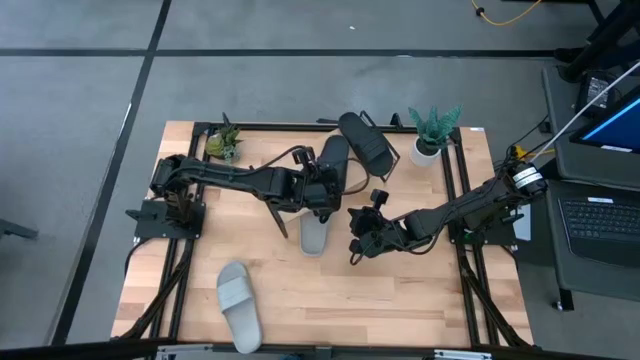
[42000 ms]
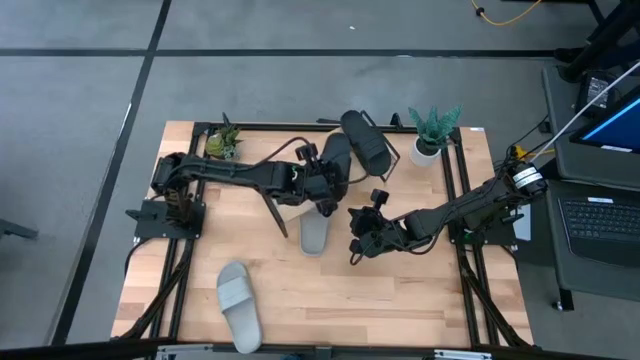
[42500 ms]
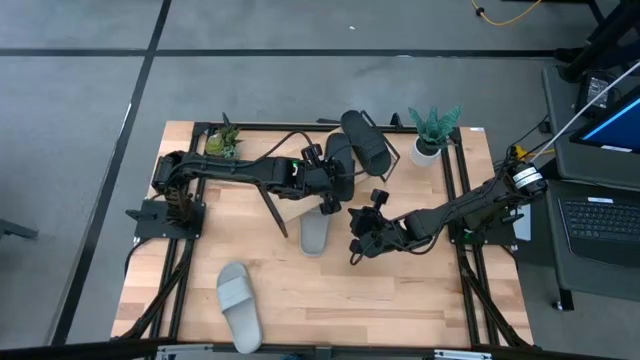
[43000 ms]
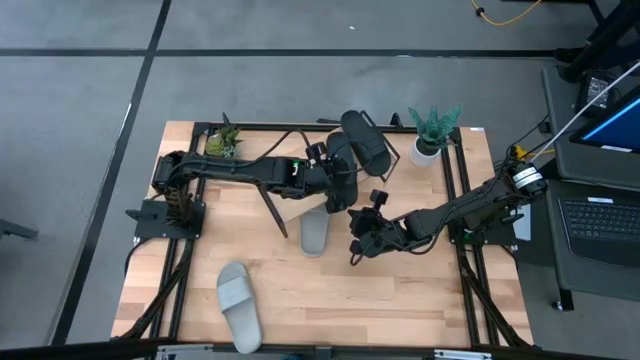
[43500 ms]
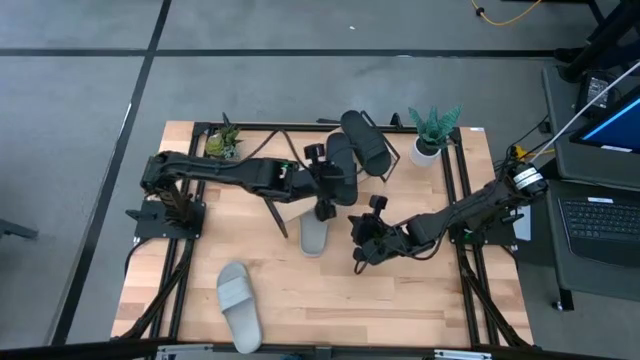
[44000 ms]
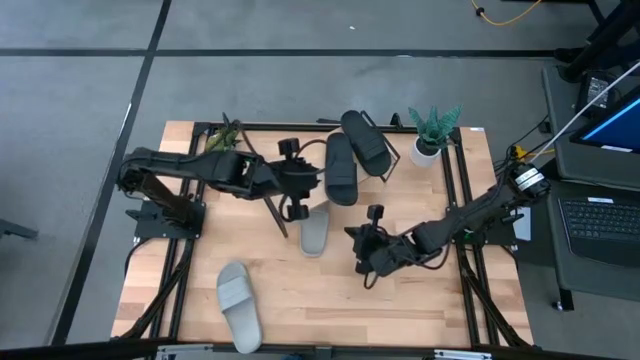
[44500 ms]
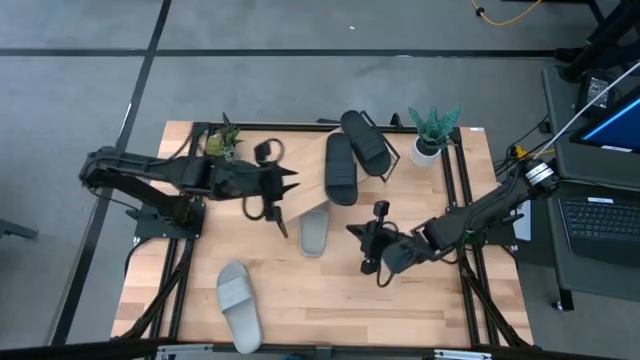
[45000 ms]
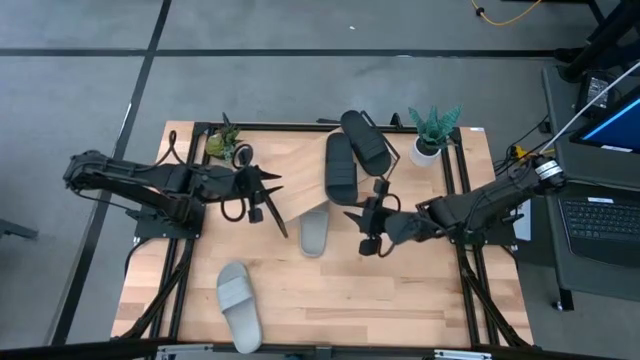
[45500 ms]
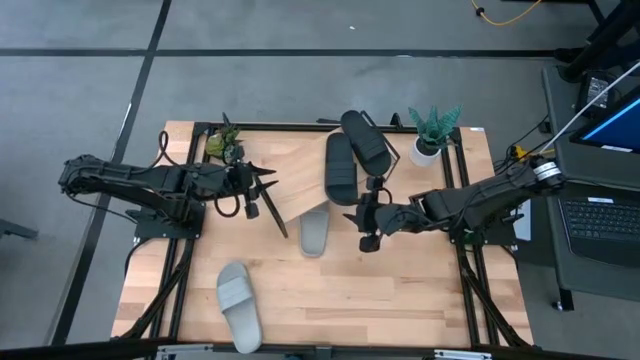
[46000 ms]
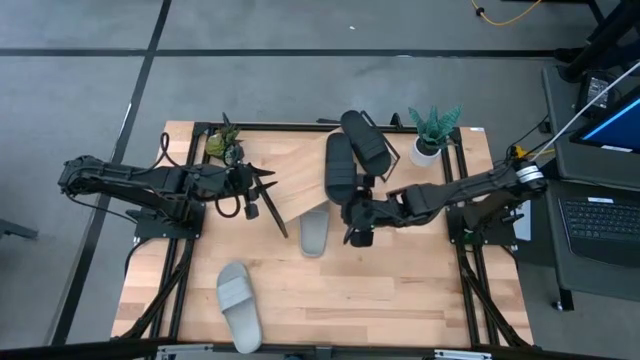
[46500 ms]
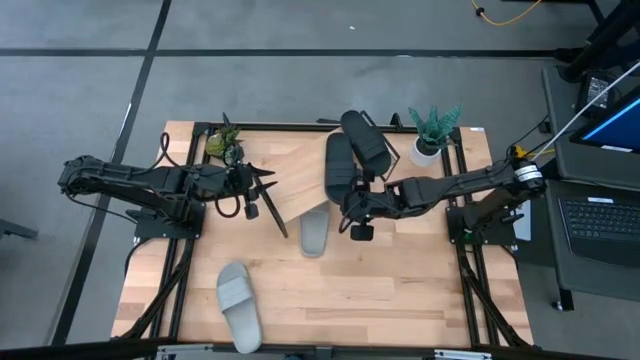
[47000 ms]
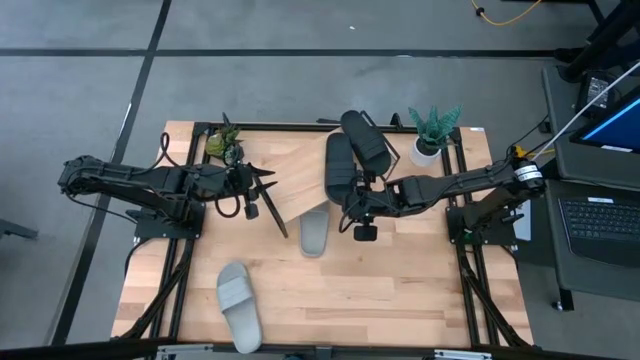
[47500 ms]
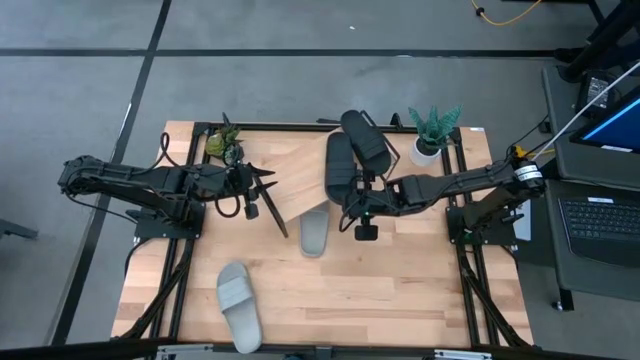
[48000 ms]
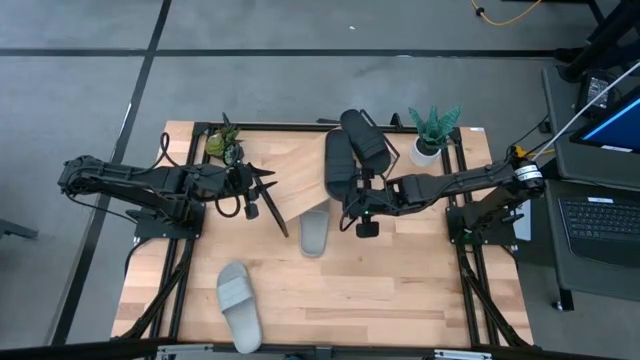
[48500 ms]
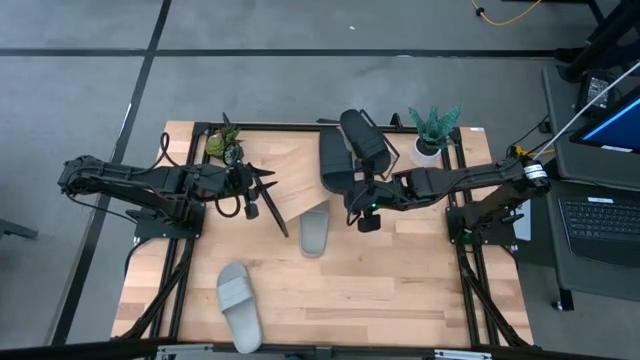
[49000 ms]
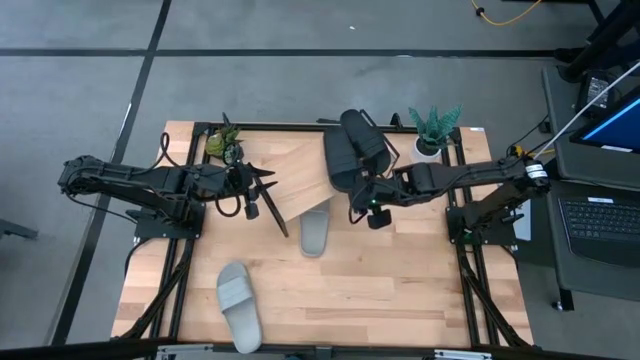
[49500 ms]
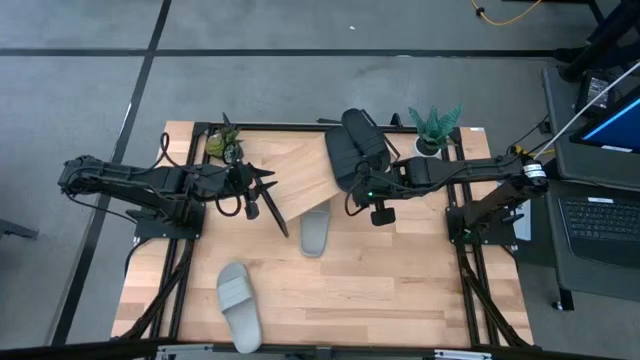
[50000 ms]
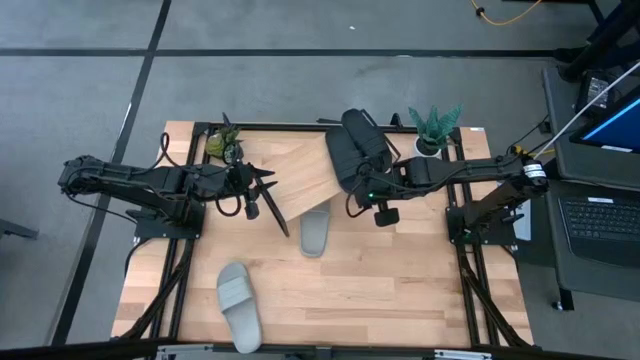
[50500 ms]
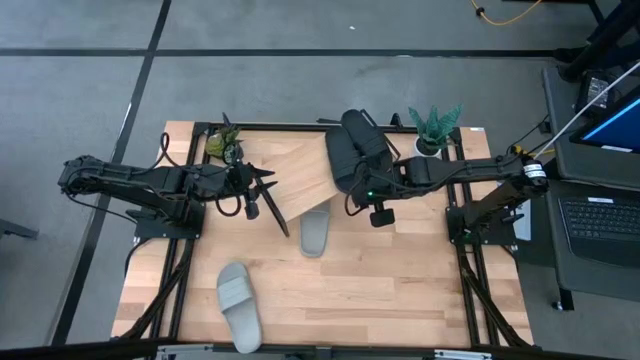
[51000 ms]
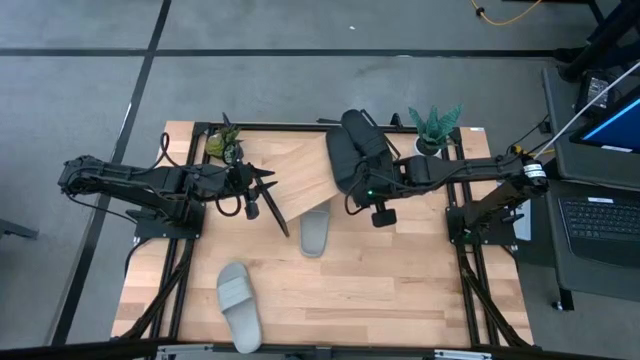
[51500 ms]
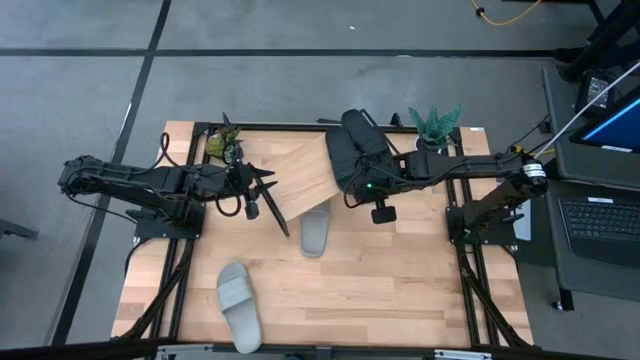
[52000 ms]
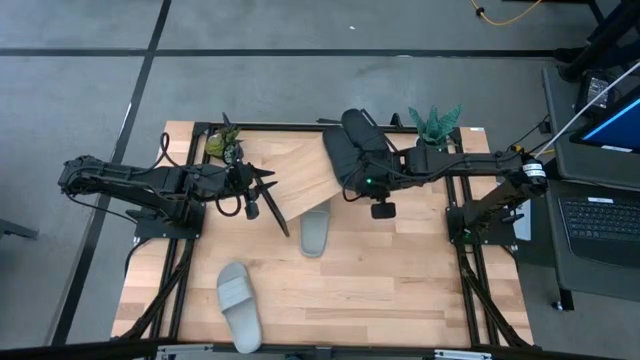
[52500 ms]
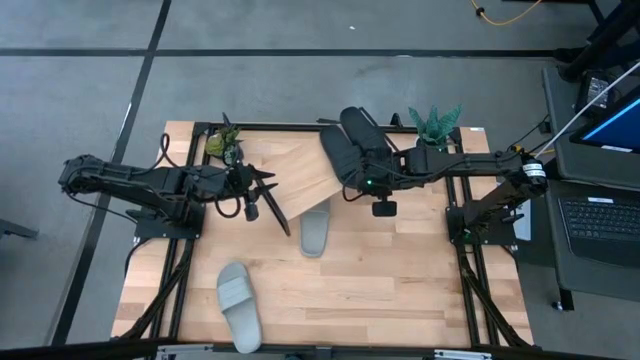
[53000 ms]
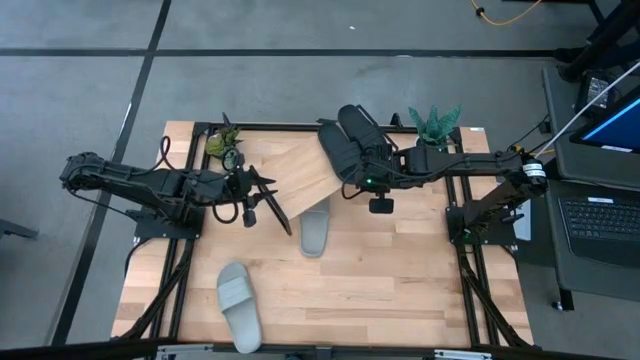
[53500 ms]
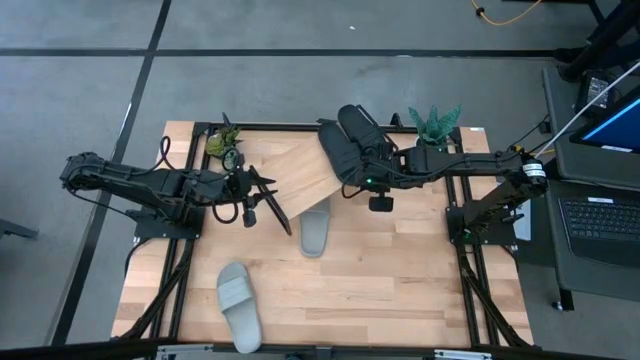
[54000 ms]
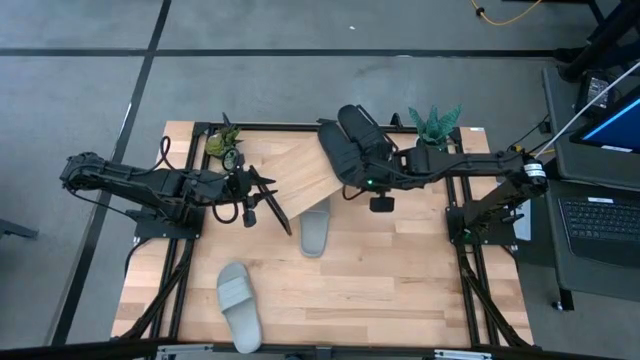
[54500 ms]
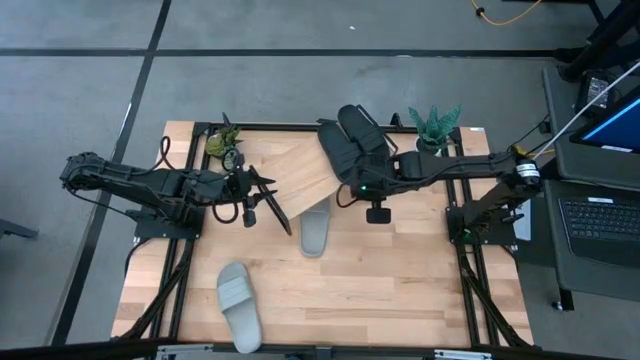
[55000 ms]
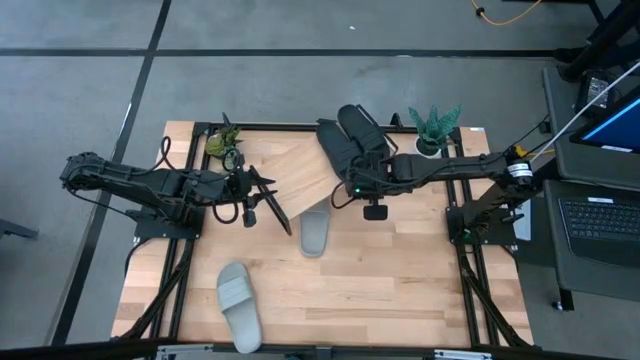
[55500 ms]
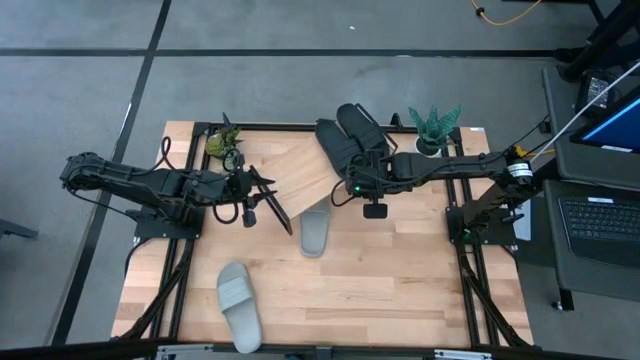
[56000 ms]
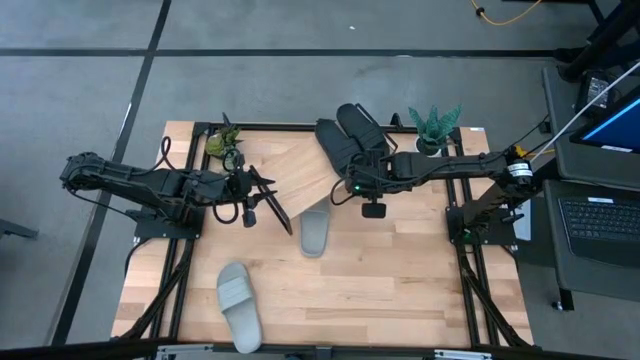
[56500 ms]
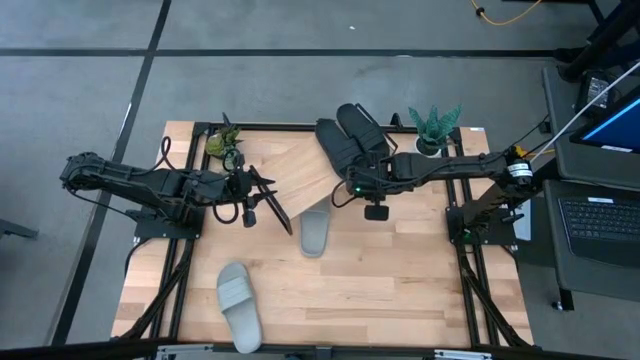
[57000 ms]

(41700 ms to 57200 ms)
Task: Pick and place slides into the shelf
Put the black slipper on the shelf

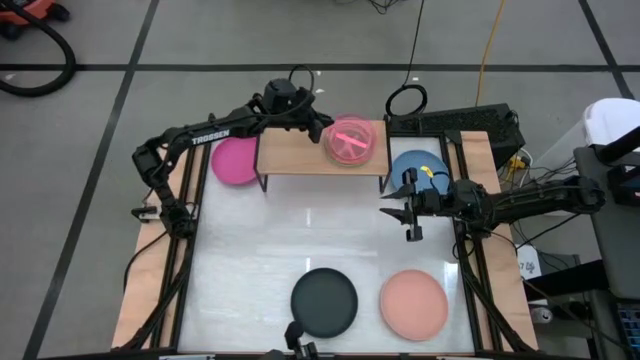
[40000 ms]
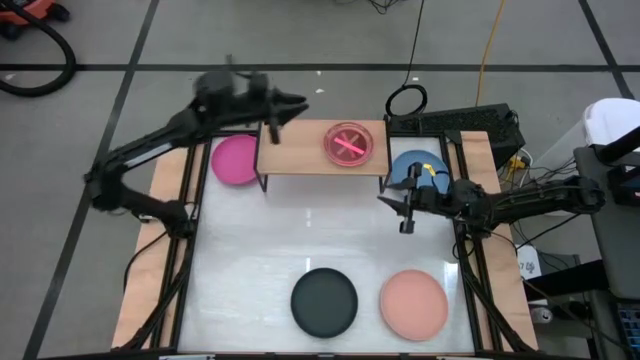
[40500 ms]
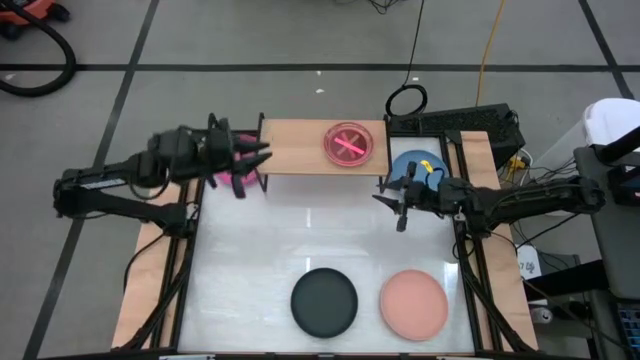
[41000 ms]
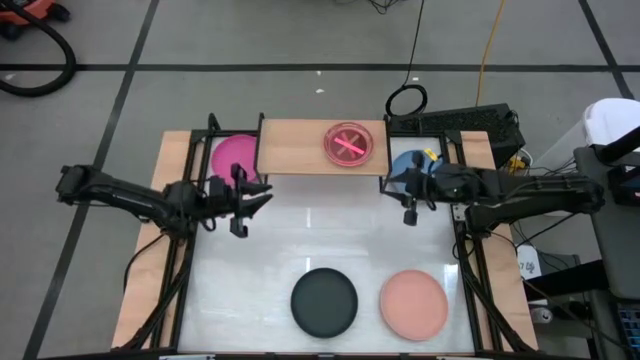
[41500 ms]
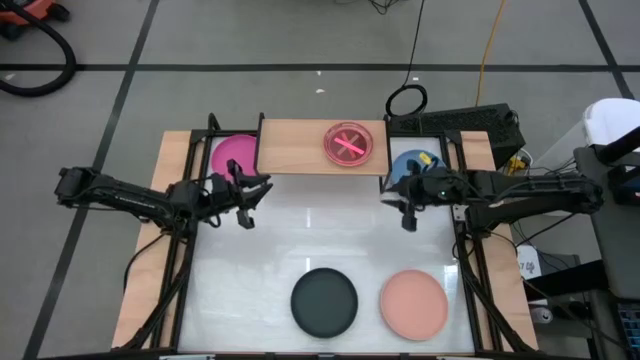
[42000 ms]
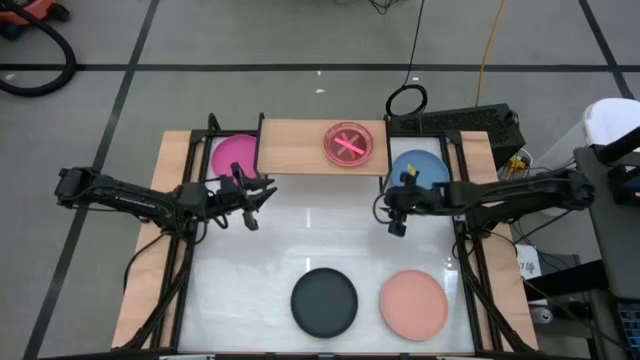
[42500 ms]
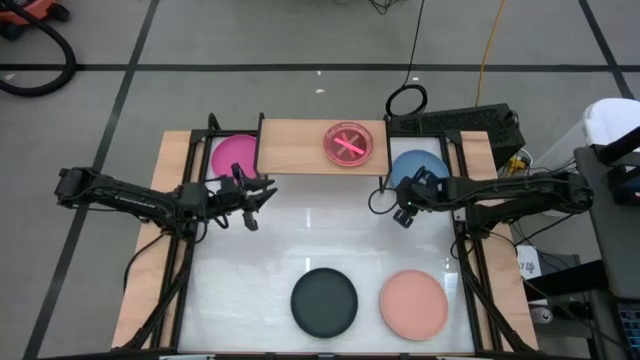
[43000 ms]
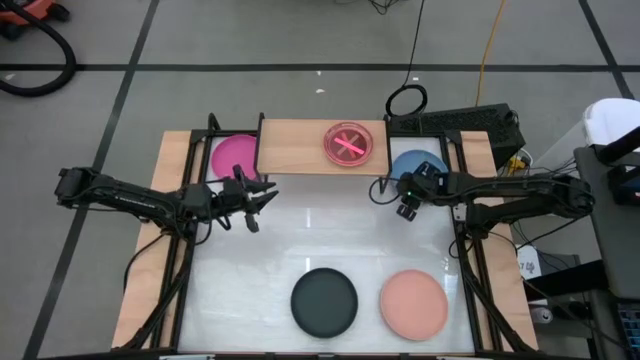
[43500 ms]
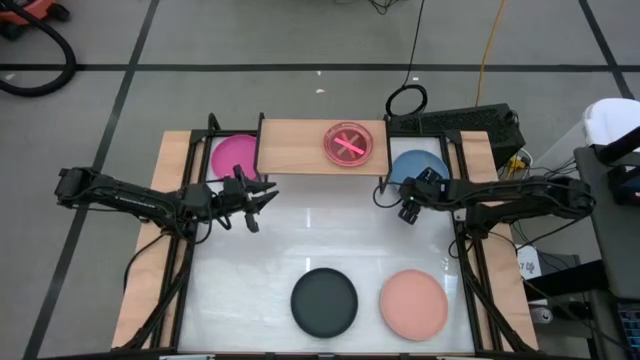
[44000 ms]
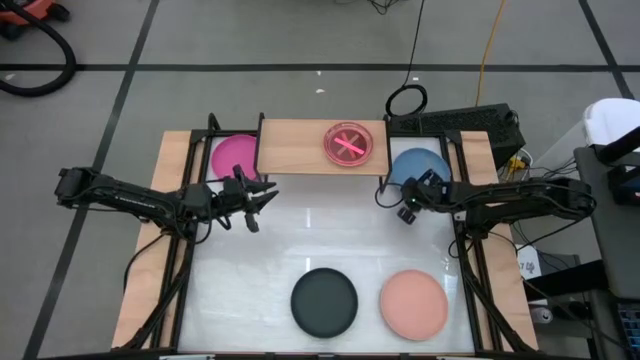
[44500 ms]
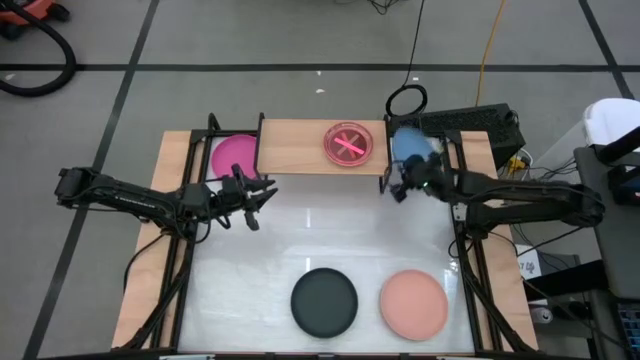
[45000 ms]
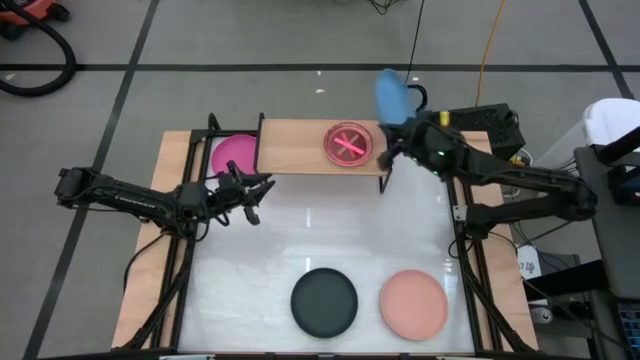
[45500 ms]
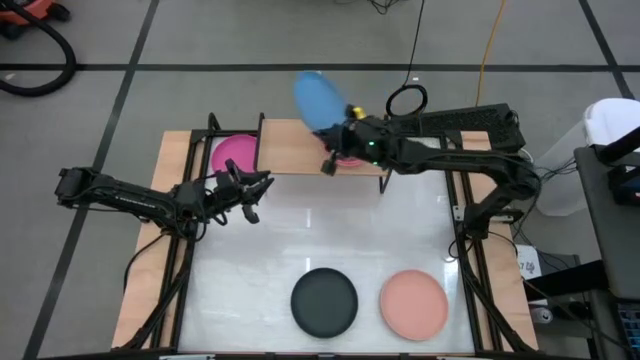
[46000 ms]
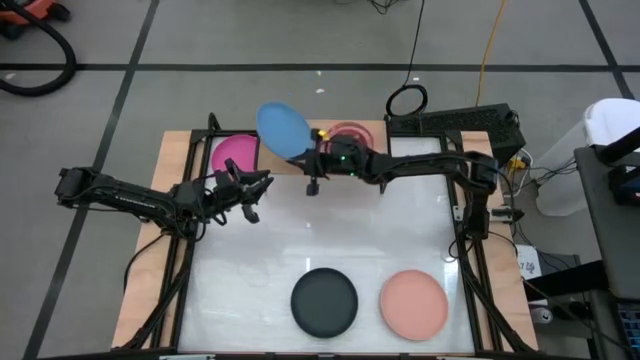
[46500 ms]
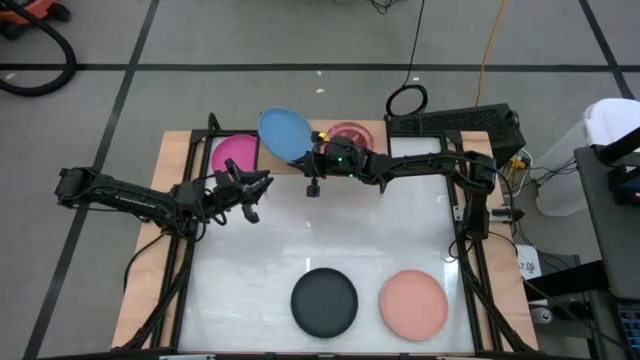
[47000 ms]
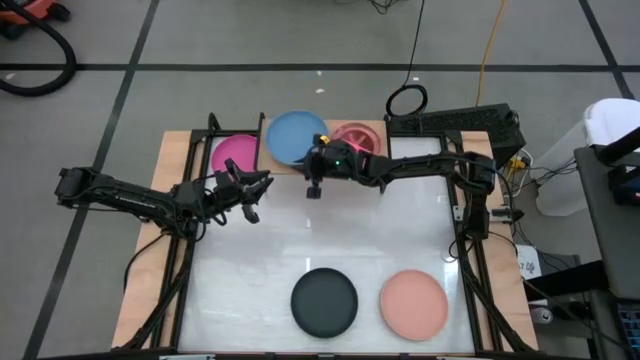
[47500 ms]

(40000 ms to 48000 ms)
Task: Place and stack plates onto a shelf
Put the blue plate on the shelf
